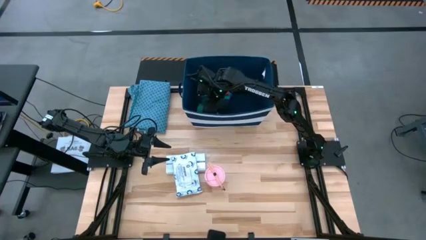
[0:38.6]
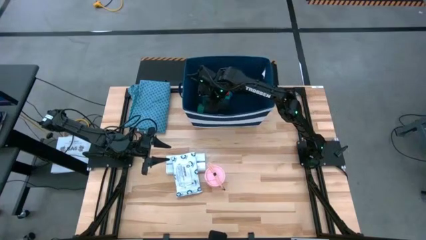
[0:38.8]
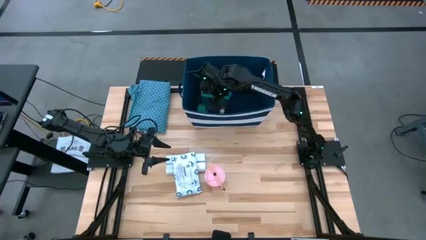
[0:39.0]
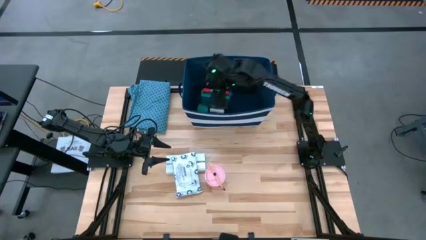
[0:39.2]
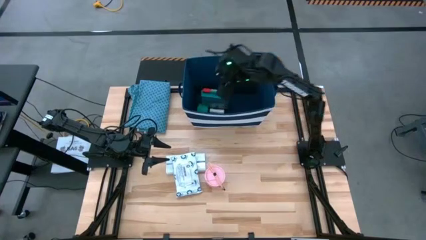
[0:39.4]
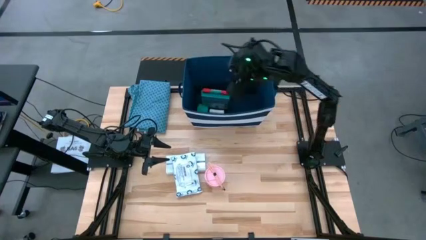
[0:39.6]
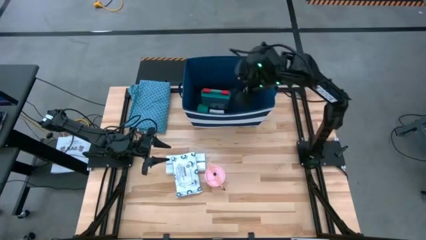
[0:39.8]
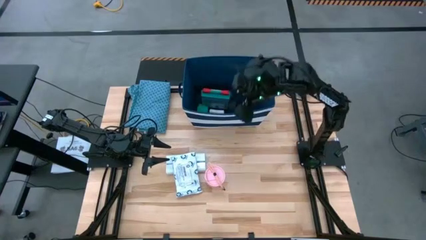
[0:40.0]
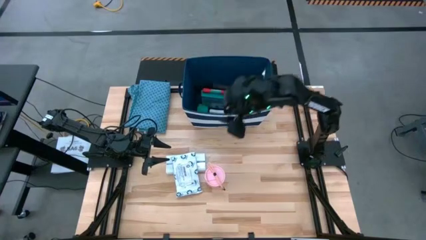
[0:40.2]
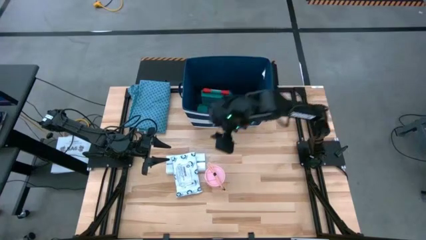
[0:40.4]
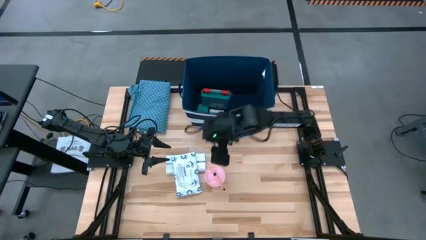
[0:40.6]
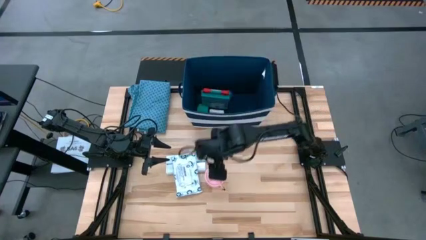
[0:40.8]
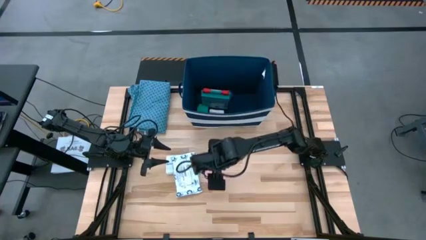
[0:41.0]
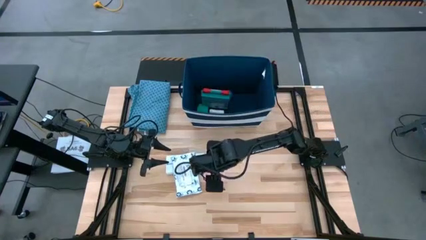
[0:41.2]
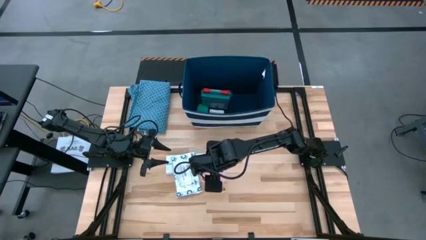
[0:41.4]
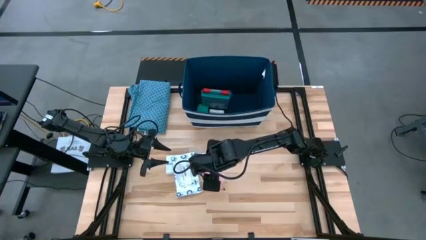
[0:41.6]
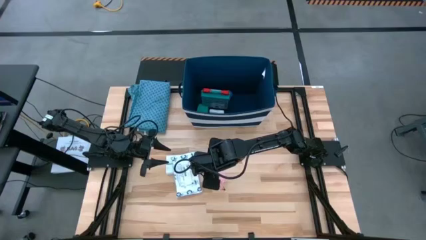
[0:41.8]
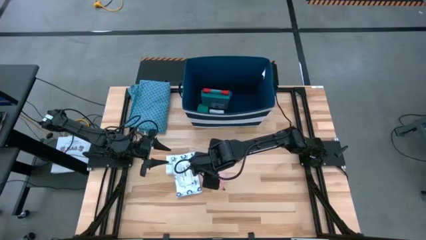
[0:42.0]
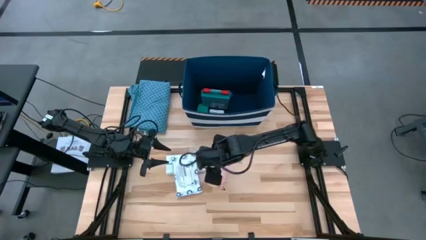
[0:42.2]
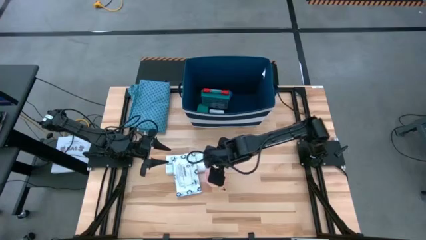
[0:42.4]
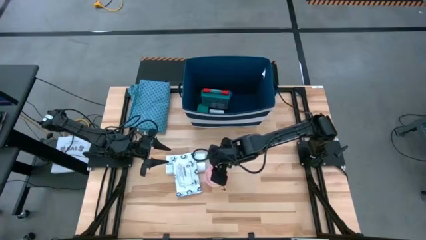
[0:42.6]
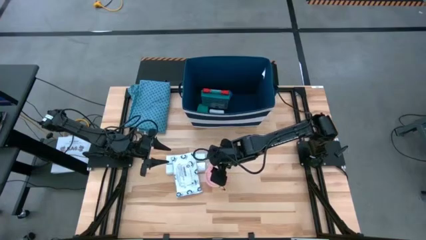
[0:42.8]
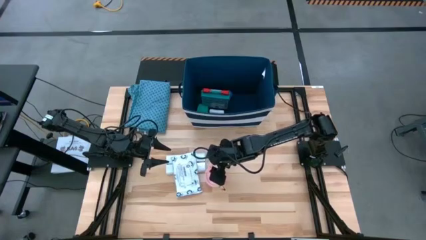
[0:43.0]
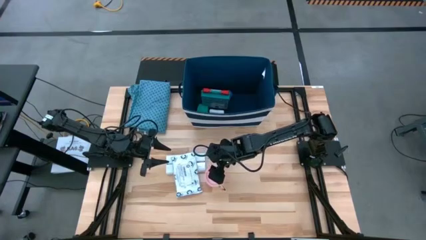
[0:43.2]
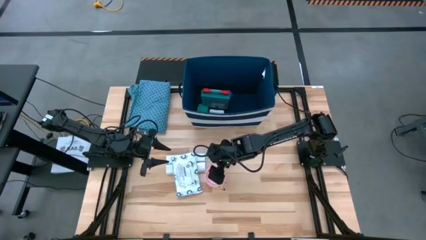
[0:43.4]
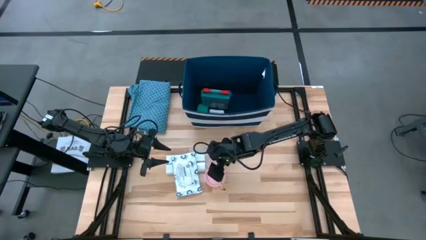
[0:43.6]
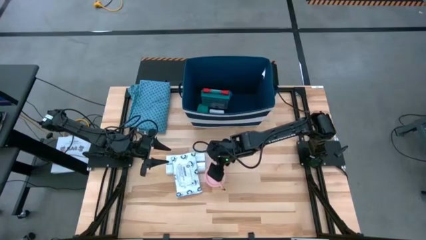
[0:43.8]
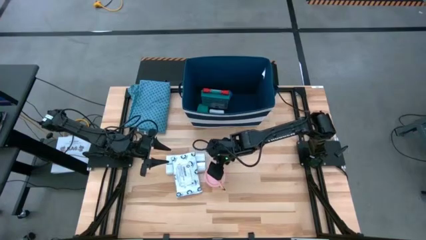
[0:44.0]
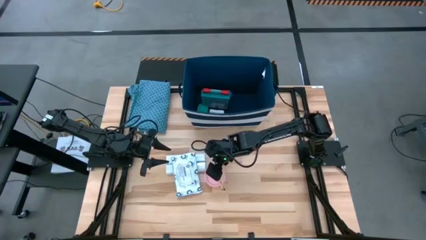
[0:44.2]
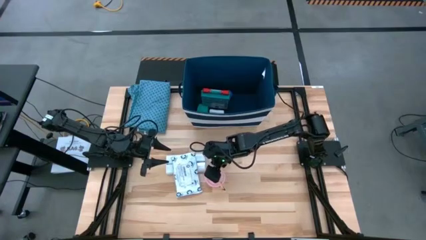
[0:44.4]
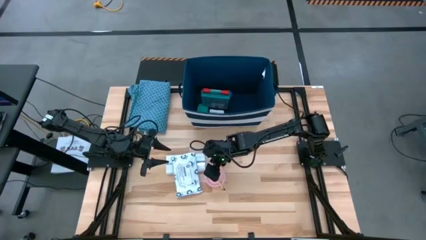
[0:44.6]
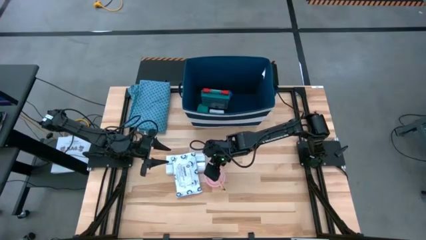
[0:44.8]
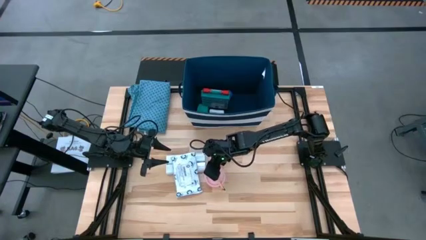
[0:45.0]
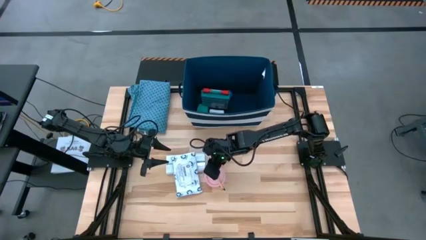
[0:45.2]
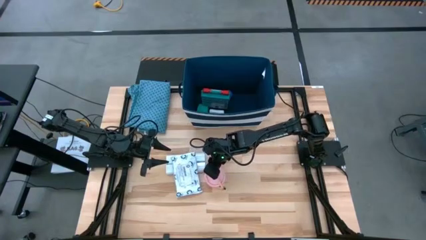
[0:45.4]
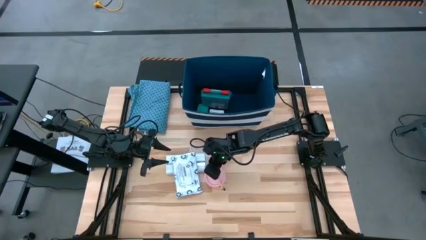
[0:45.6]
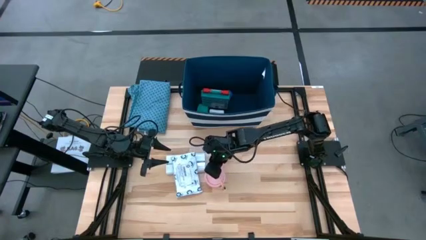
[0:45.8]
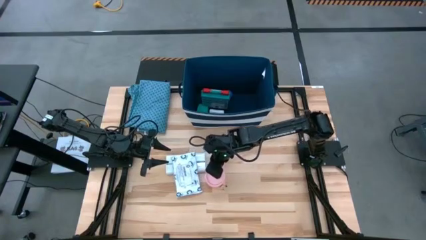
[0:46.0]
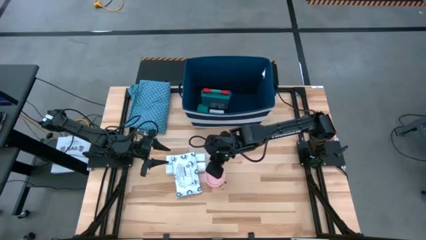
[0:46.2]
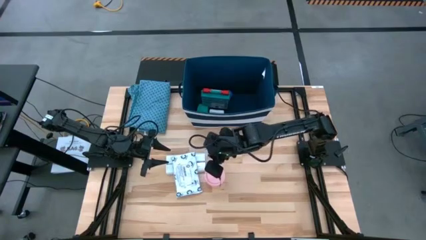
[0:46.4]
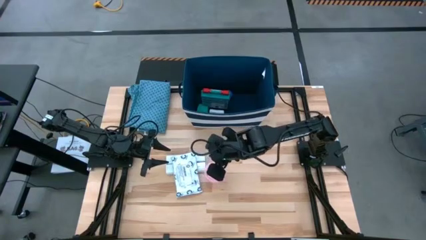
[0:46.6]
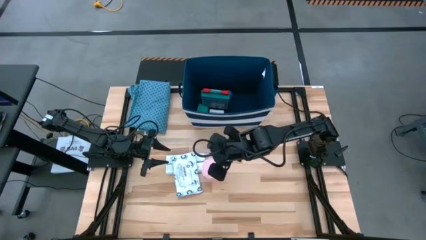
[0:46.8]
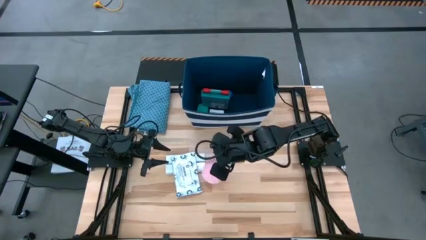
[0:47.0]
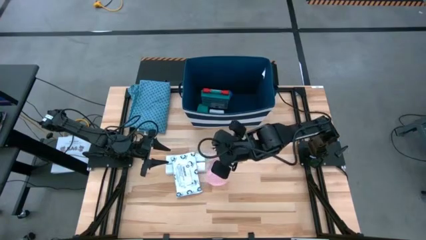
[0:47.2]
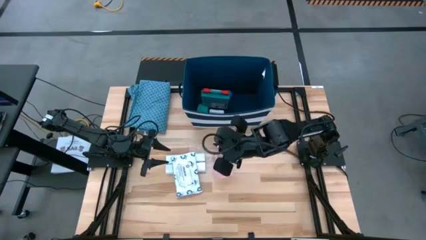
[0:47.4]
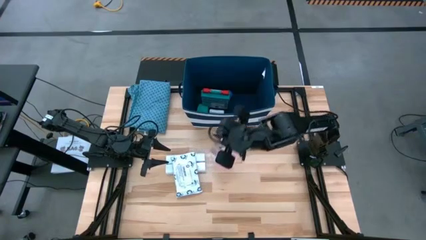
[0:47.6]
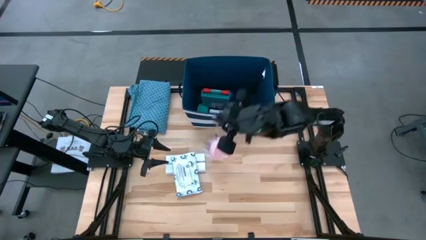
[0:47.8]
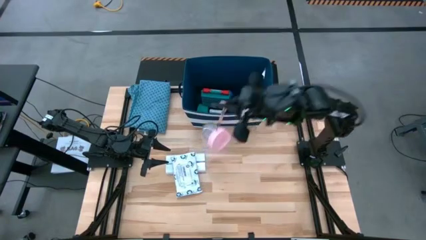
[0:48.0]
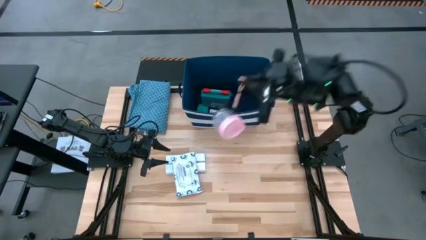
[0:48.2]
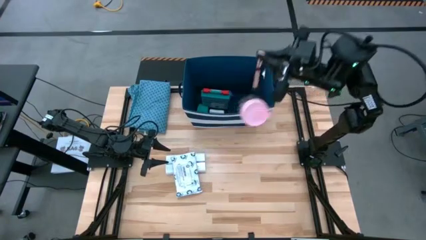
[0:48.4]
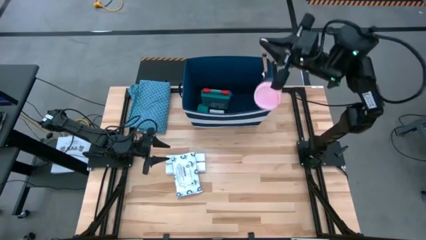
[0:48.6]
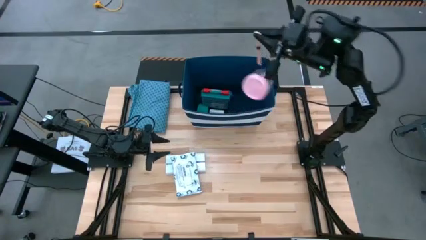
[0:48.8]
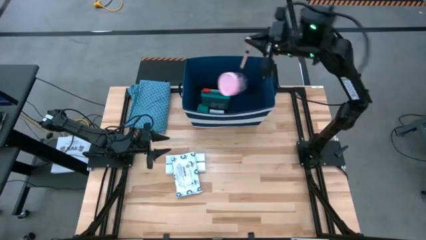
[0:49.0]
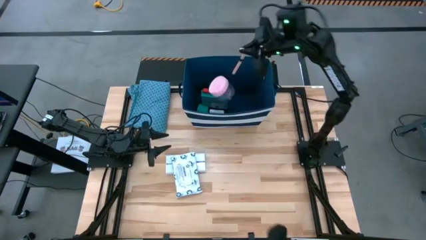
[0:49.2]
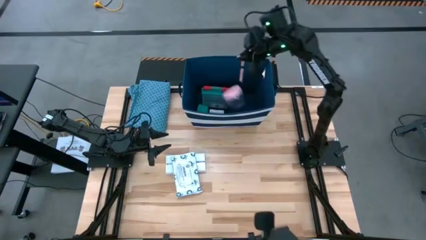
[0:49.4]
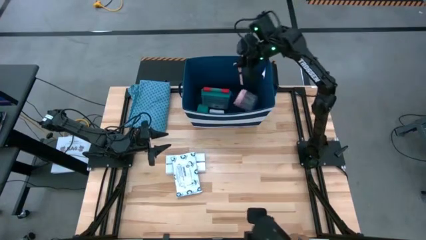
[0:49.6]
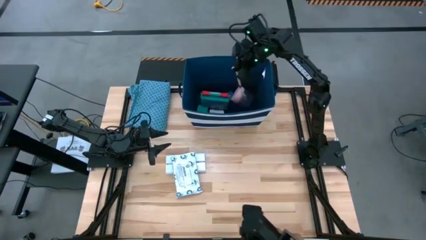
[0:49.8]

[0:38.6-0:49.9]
Task: Pick & place medical supplies in basket/bin
Put the pink tumbler into the blue bin
